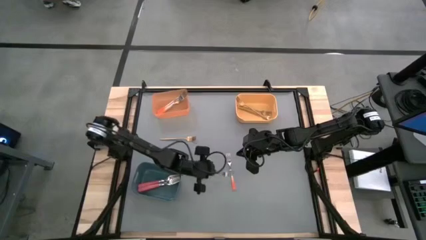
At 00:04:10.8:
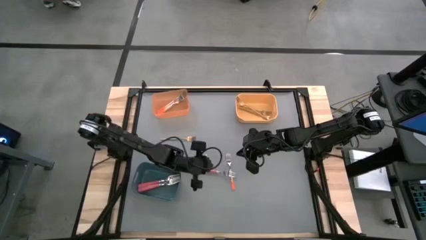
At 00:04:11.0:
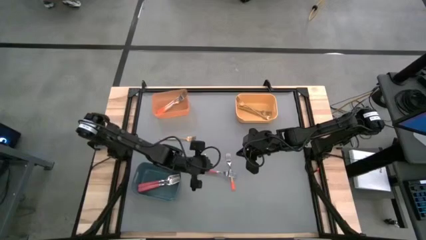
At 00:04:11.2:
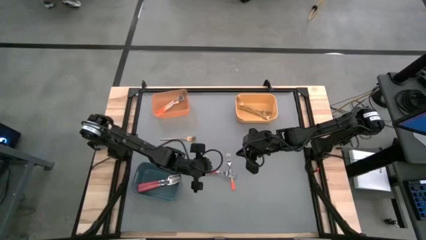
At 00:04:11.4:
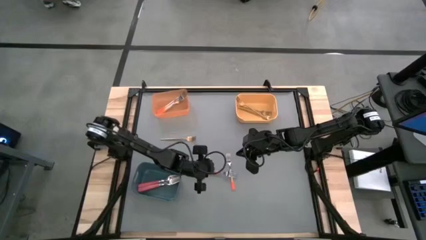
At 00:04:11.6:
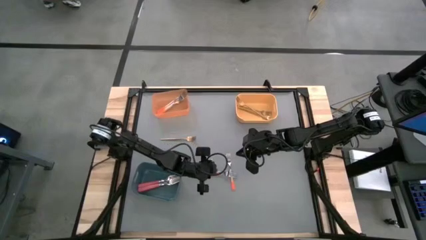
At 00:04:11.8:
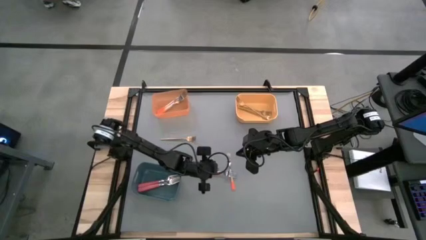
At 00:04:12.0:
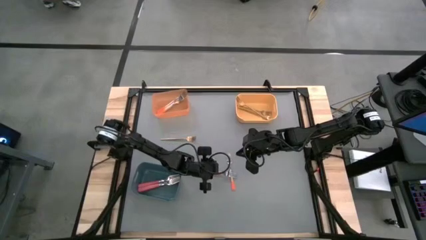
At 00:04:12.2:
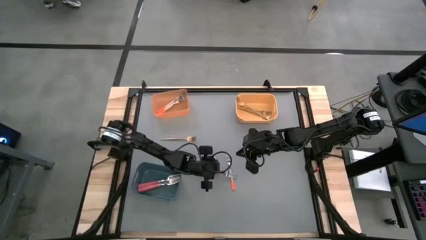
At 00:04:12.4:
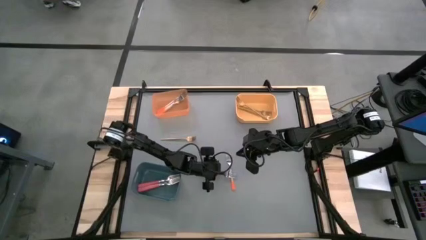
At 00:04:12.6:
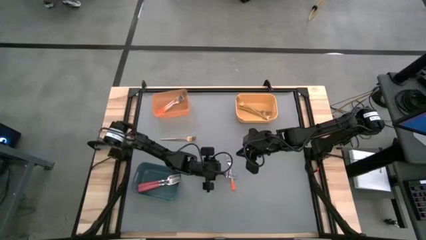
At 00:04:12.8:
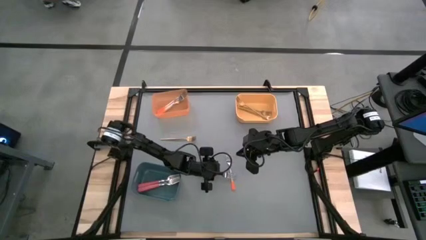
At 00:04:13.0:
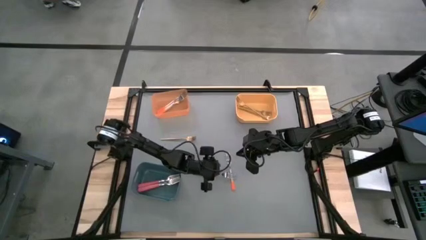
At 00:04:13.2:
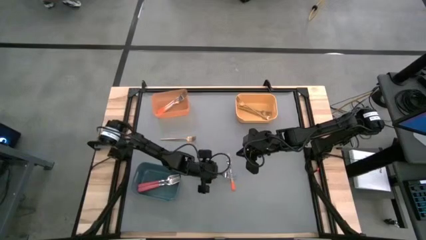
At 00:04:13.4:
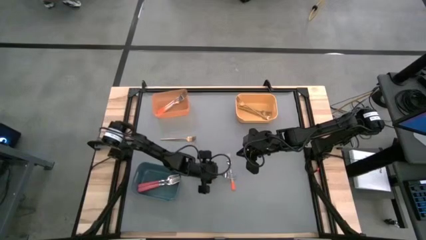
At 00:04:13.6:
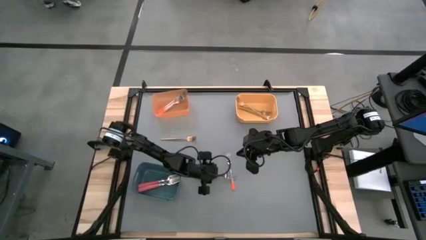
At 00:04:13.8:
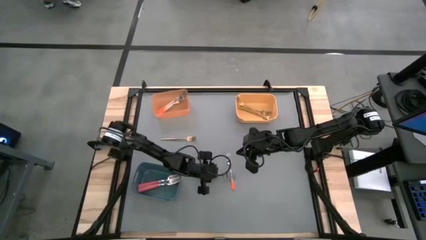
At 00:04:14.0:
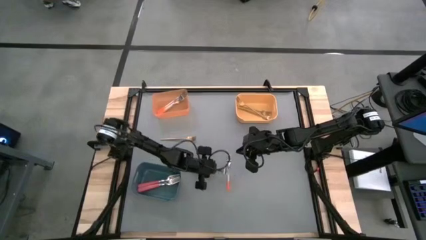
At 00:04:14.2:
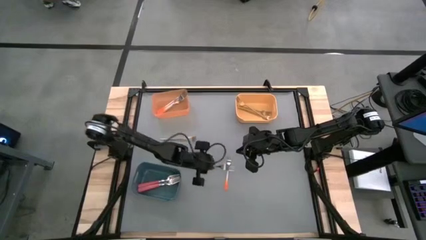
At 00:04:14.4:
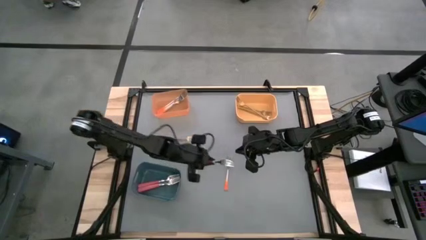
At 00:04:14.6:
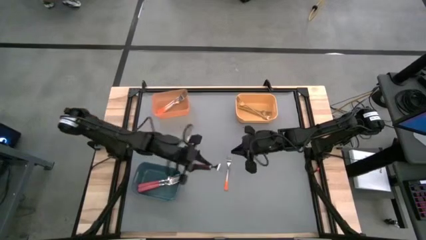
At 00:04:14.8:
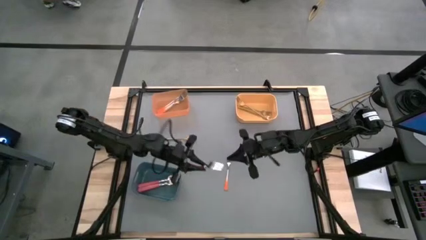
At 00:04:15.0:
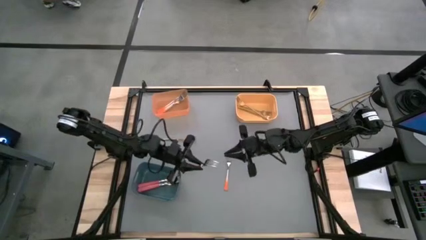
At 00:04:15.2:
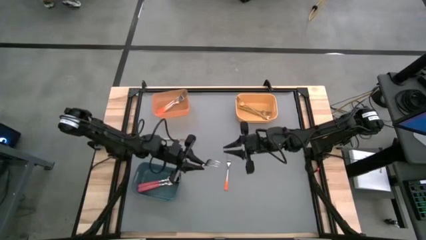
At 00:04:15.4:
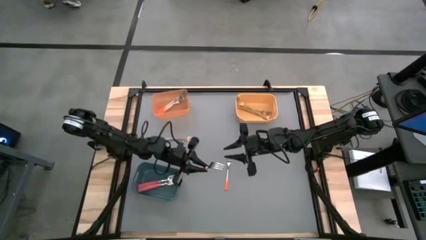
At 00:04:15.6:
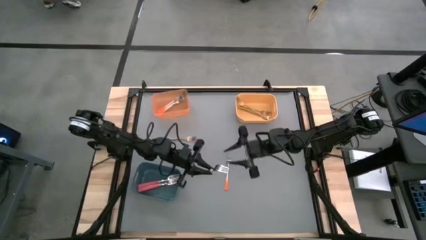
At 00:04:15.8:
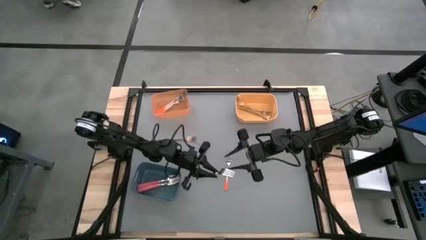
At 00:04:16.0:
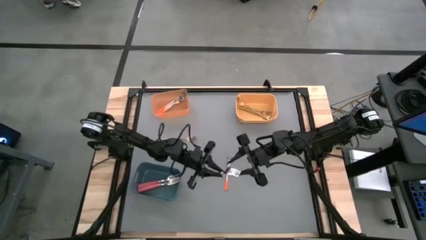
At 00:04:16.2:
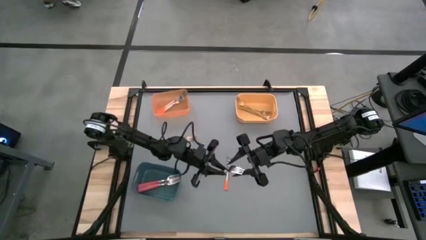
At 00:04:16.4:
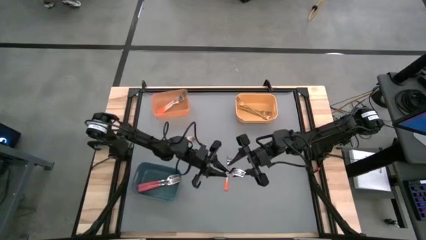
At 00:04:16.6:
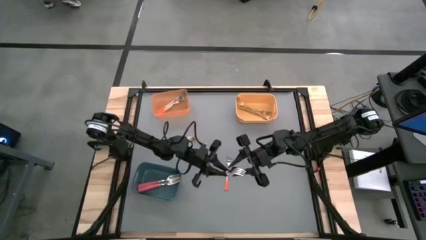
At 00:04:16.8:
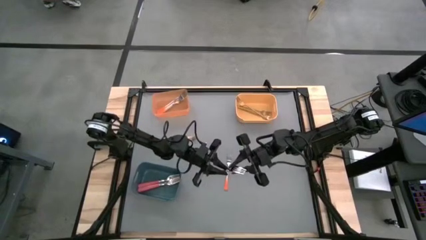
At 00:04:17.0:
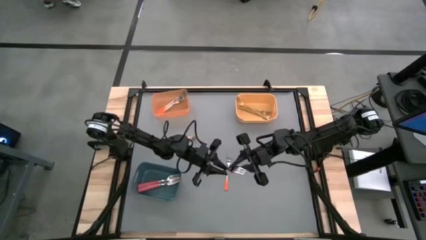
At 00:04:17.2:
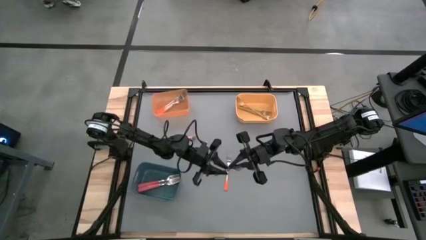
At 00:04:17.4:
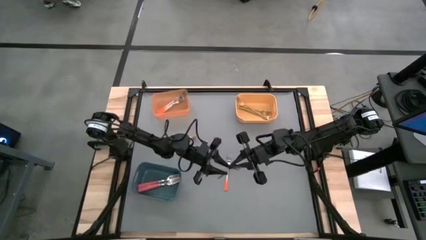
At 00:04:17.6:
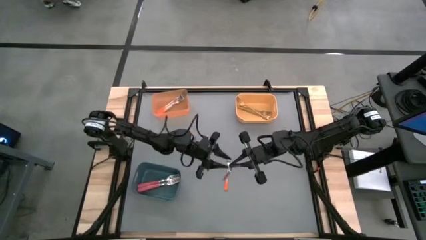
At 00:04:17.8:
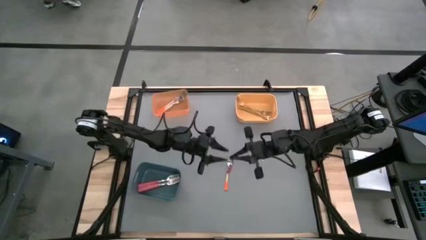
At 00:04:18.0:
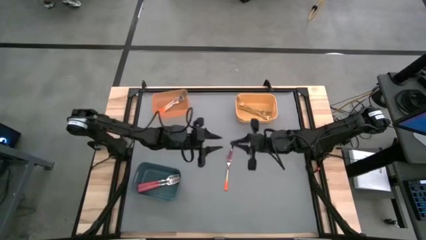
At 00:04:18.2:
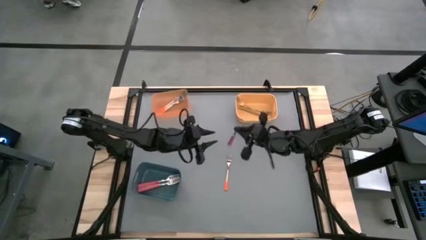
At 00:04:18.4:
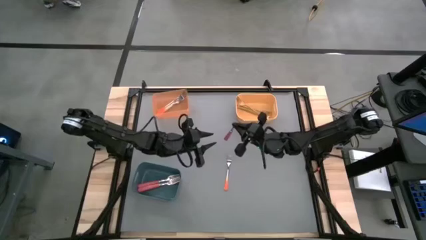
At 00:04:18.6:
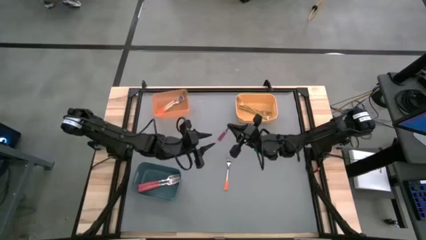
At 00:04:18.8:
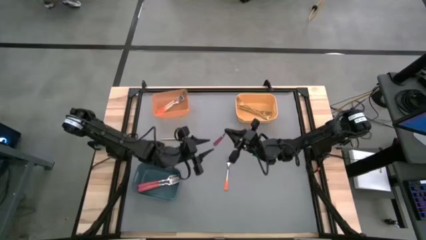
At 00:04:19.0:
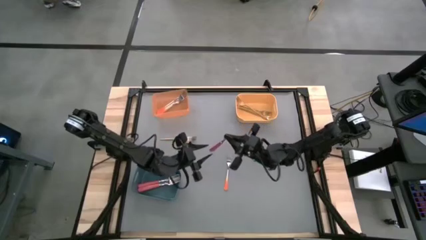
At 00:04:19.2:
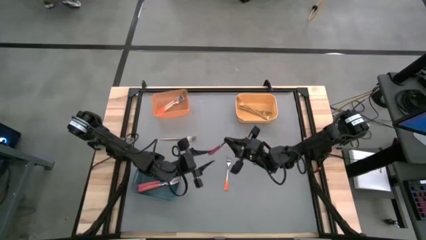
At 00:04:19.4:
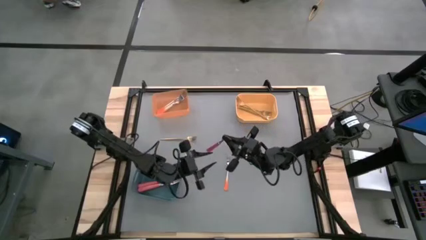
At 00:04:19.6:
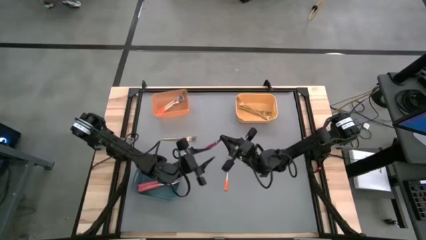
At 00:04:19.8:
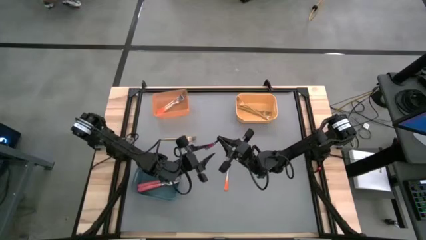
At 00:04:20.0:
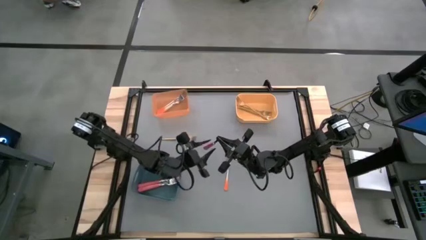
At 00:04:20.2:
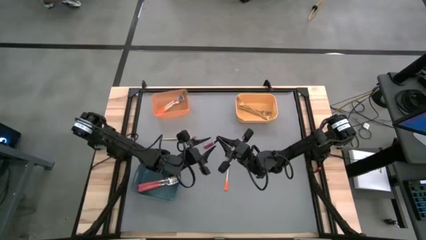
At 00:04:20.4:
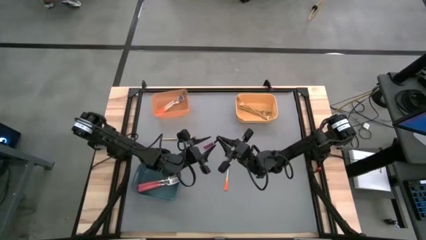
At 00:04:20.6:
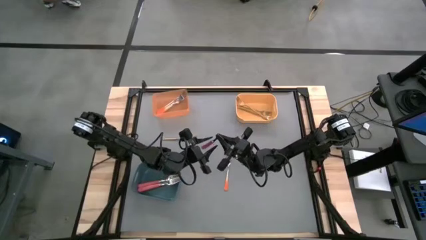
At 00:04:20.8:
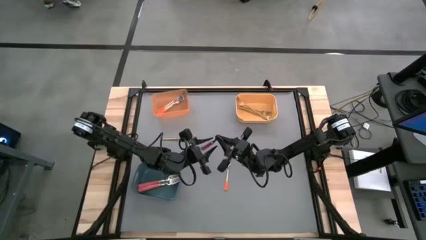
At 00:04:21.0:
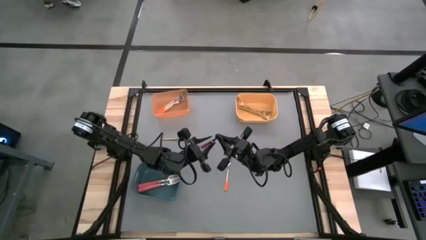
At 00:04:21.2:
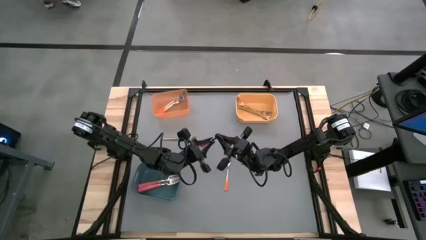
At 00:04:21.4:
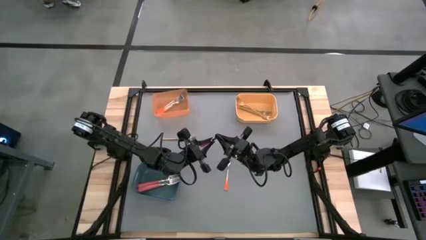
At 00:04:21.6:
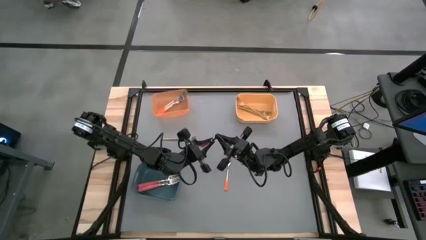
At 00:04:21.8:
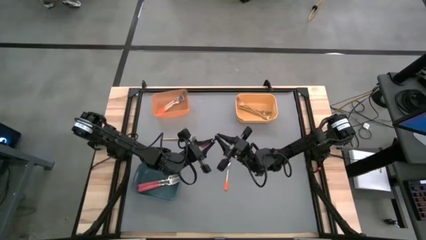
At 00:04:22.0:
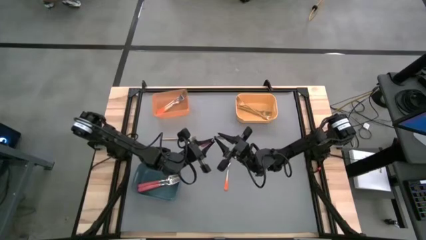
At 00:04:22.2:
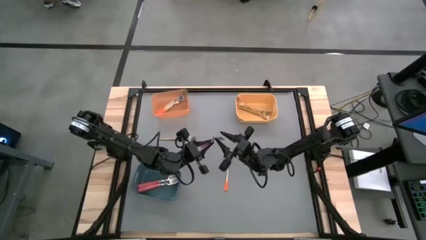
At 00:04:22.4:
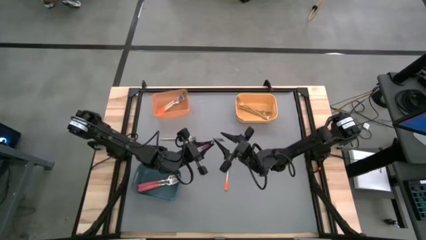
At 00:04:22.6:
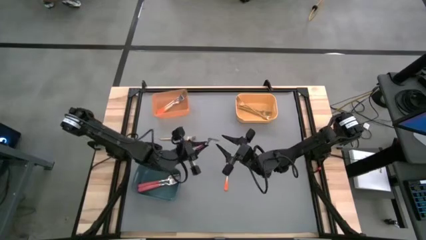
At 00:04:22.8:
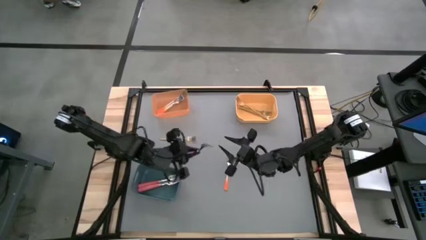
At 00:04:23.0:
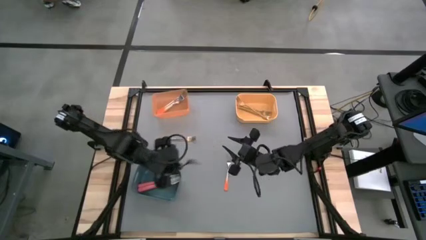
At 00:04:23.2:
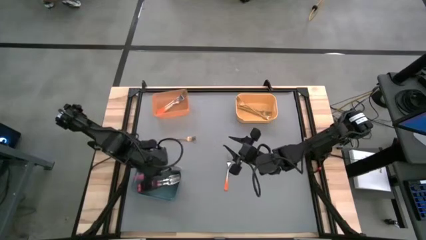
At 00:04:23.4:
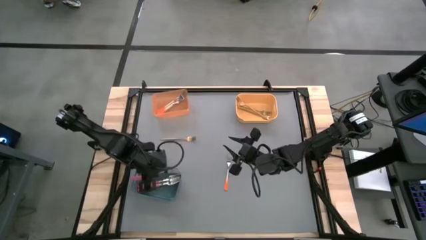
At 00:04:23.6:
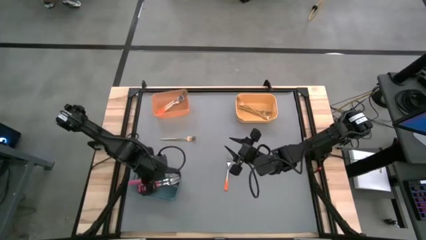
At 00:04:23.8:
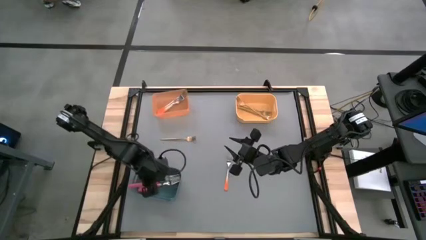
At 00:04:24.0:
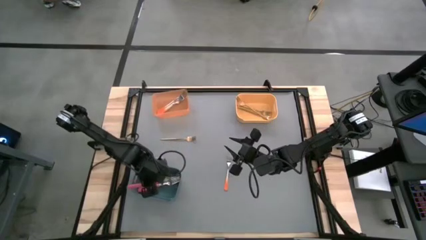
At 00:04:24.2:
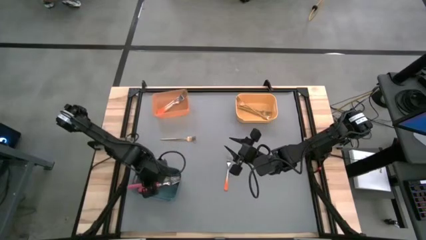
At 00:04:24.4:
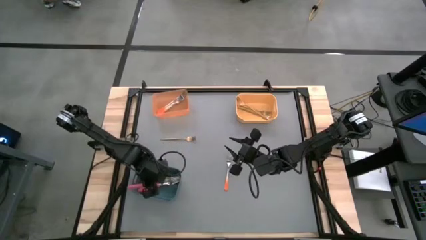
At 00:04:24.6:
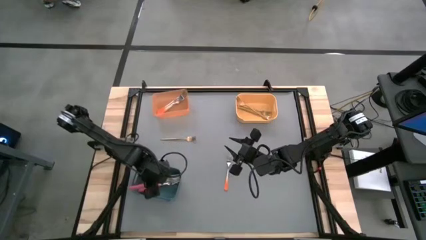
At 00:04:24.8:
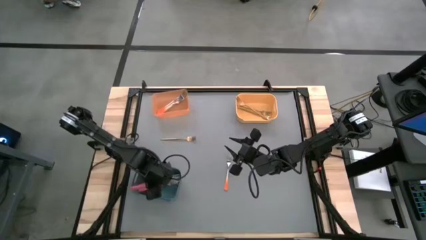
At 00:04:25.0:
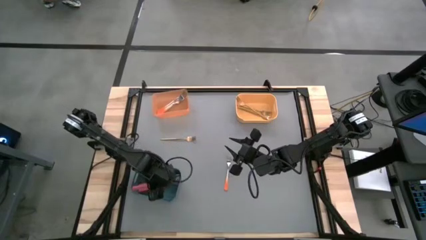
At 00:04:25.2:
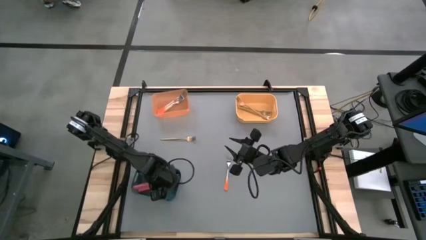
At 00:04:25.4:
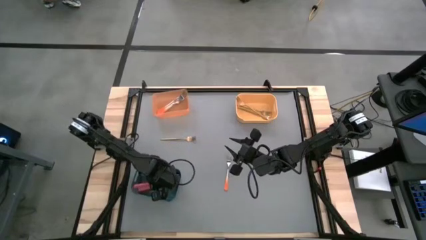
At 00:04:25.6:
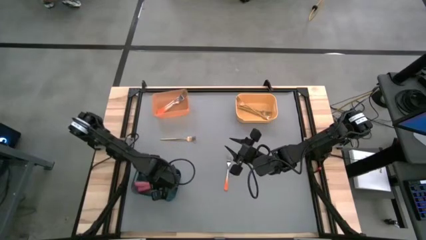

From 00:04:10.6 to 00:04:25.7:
Task: Sort silverware by color (type)
Put the pink fork into the blue bin
